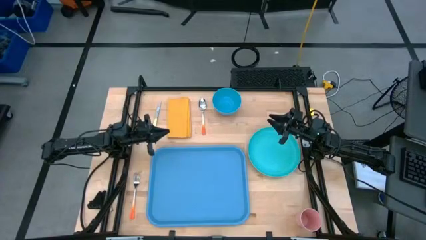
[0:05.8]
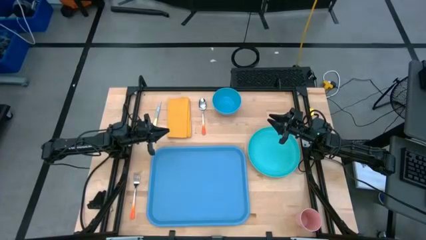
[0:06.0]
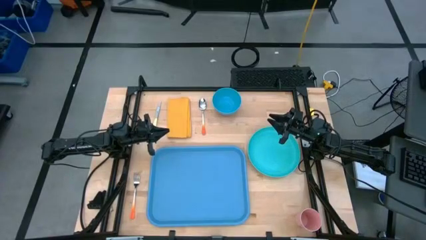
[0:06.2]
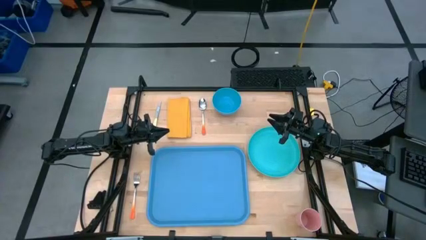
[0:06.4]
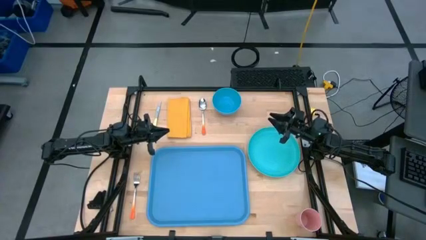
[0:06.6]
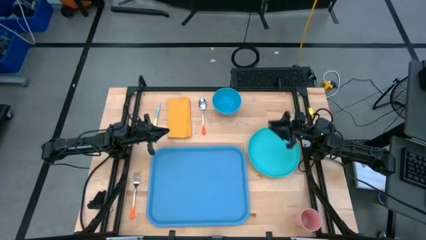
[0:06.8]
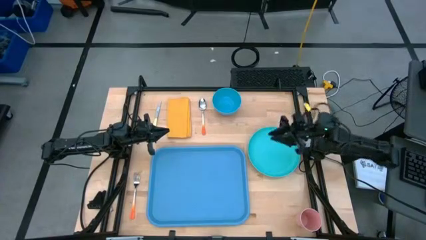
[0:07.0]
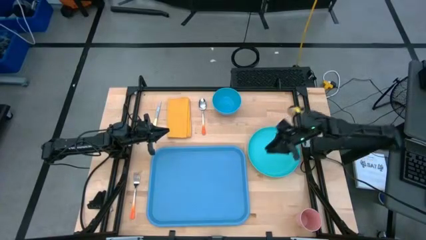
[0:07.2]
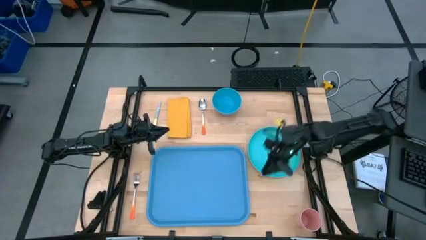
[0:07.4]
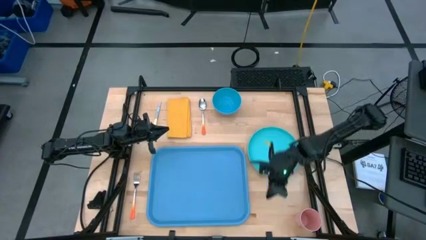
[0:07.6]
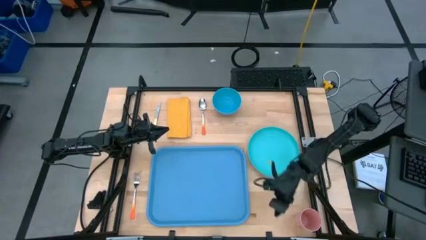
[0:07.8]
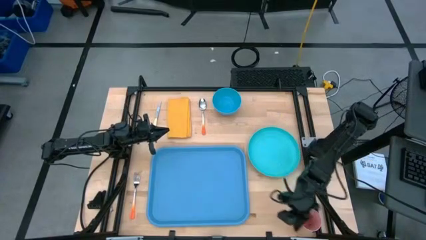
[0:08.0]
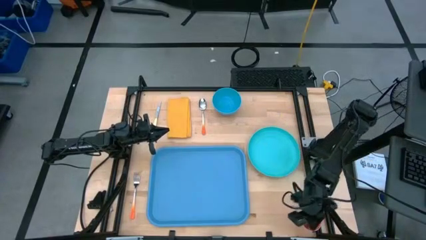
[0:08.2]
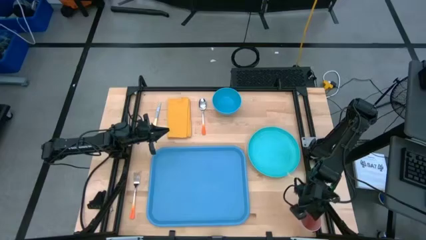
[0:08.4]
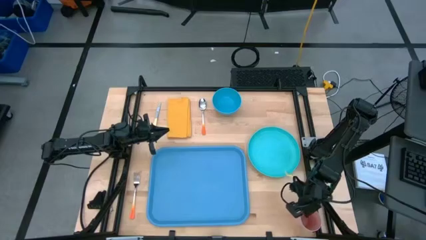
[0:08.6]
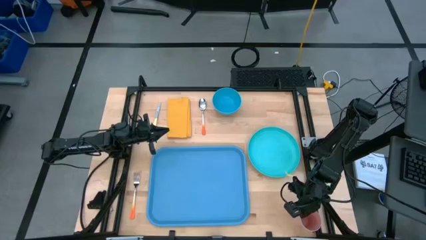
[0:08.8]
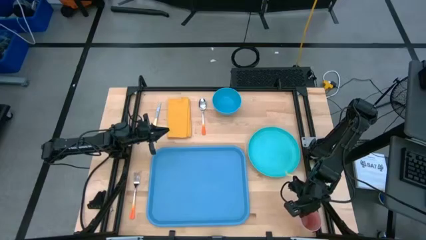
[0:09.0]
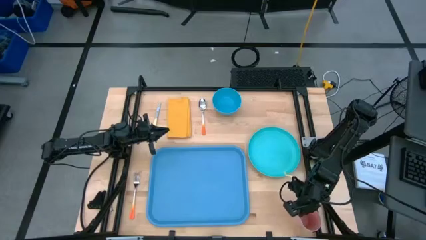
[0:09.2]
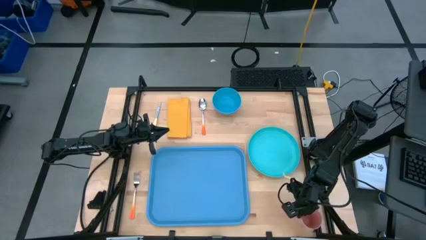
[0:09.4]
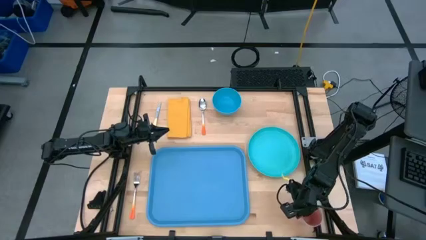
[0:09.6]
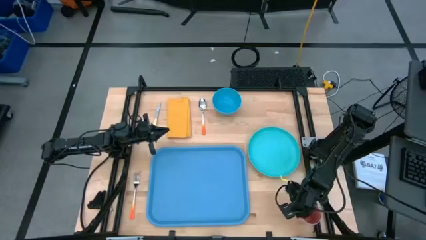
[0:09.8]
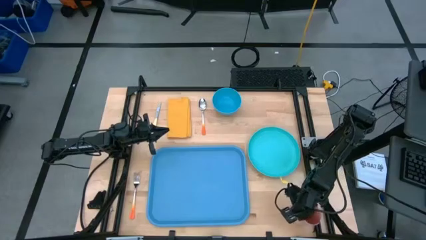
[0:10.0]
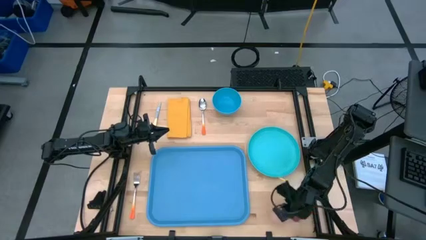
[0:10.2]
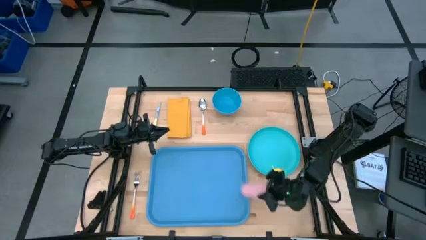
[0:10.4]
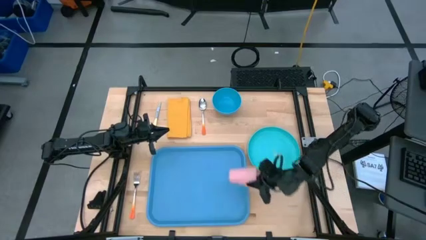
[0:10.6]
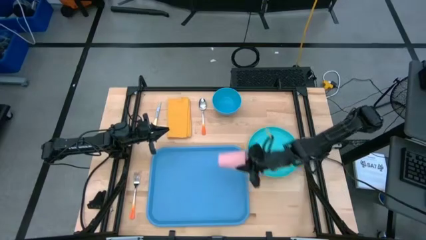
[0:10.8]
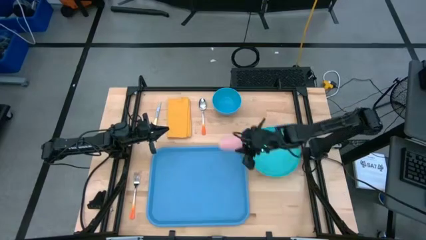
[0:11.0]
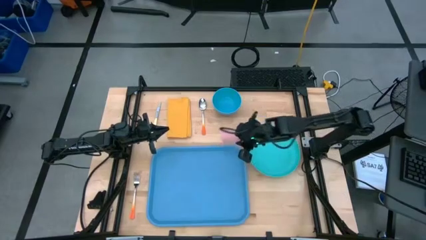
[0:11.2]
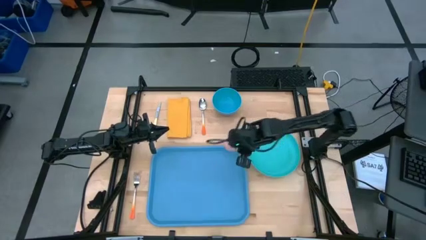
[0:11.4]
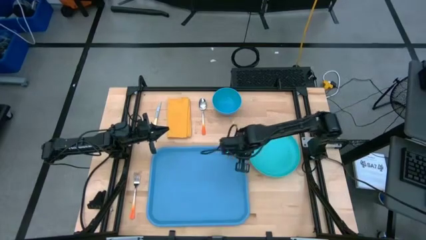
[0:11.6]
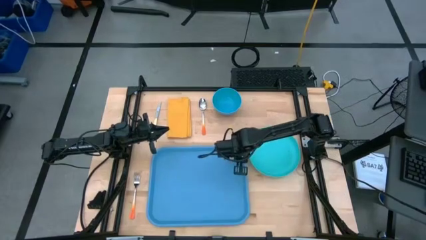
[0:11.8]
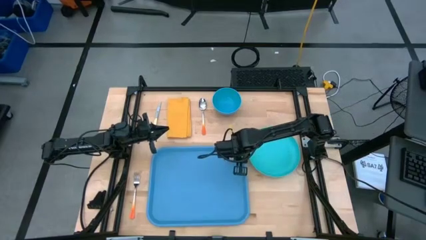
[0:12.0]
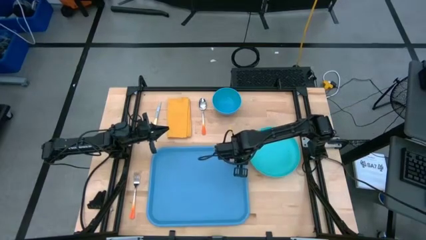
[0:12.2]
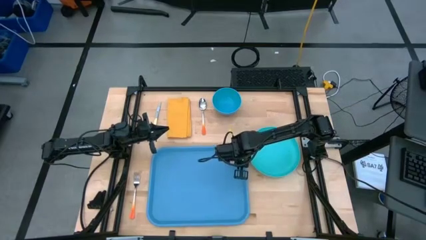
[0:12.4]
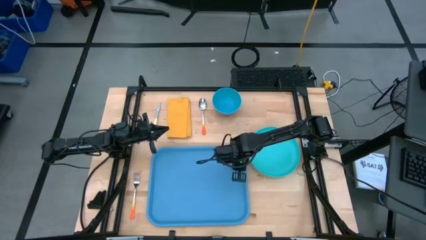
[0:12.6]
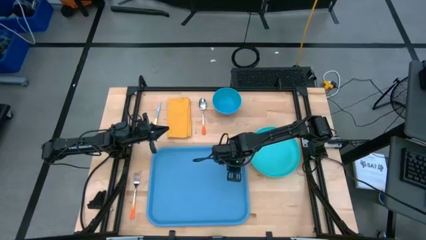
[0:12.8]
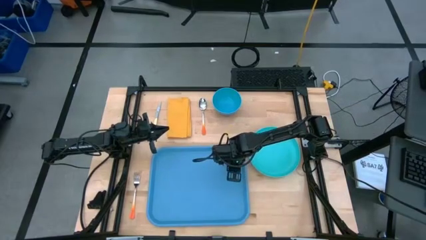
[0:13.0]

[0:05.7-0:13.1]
Task: Set up tray
Put the pink cup at the top right of the blue serving tray

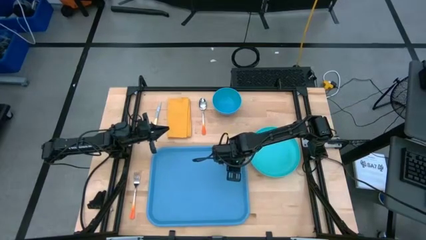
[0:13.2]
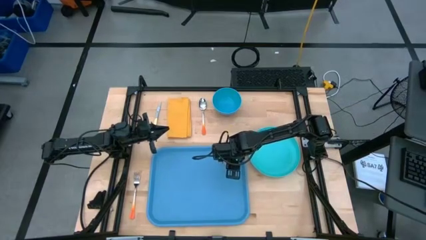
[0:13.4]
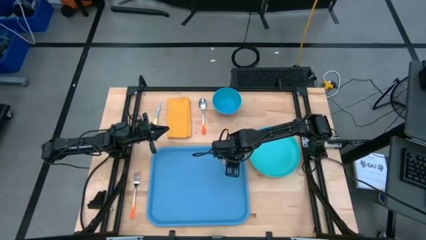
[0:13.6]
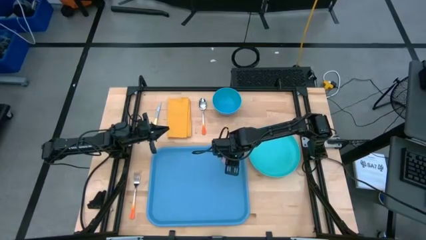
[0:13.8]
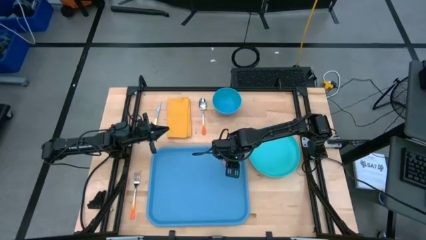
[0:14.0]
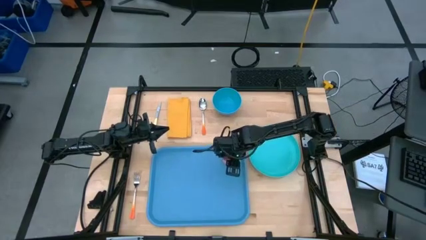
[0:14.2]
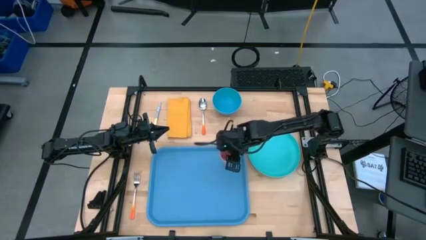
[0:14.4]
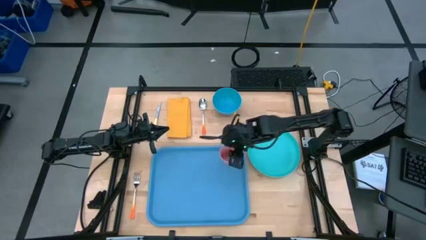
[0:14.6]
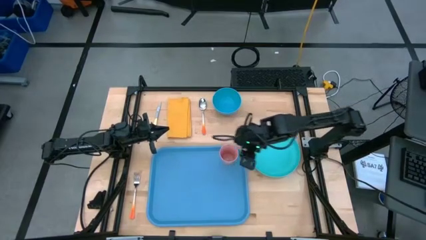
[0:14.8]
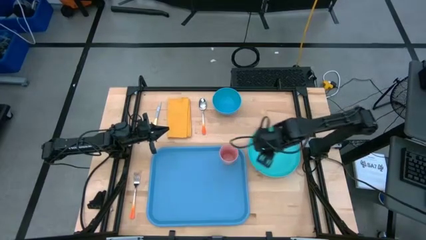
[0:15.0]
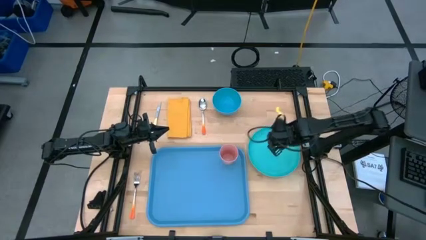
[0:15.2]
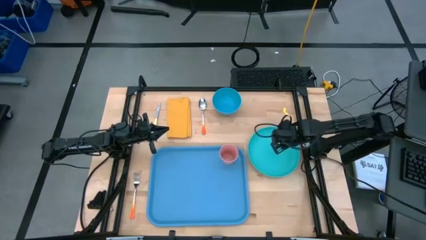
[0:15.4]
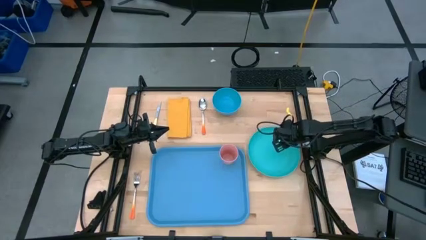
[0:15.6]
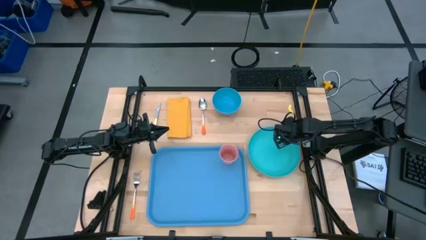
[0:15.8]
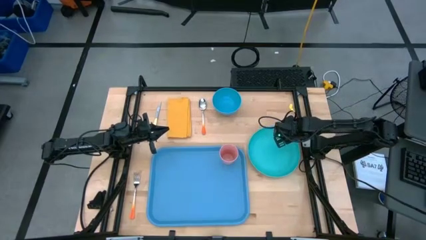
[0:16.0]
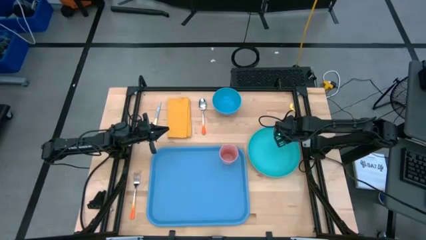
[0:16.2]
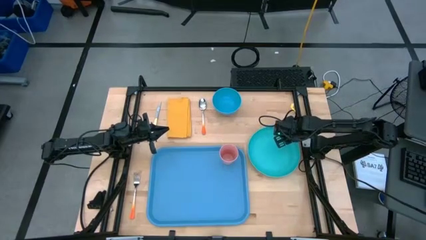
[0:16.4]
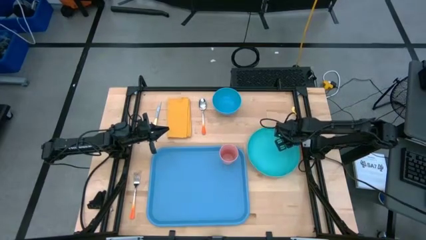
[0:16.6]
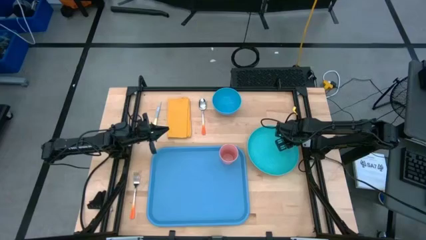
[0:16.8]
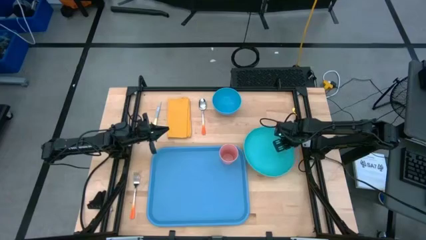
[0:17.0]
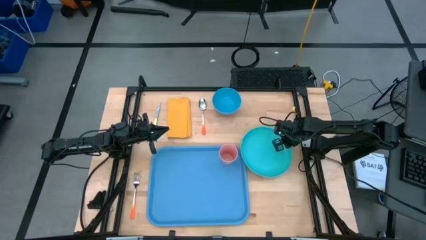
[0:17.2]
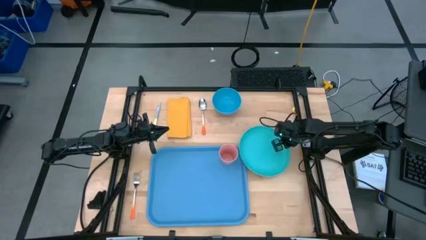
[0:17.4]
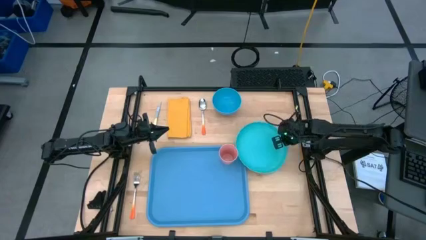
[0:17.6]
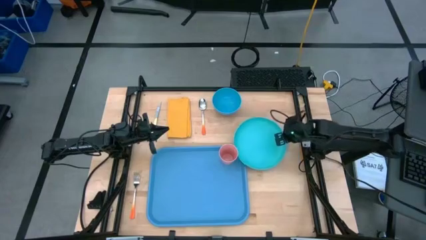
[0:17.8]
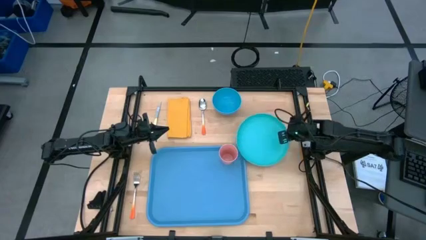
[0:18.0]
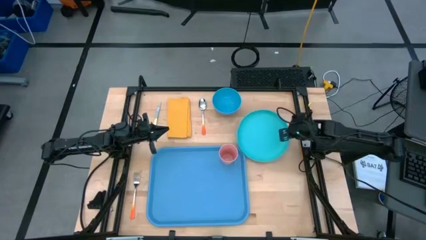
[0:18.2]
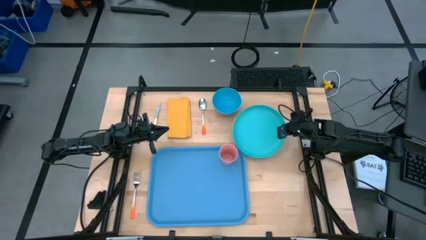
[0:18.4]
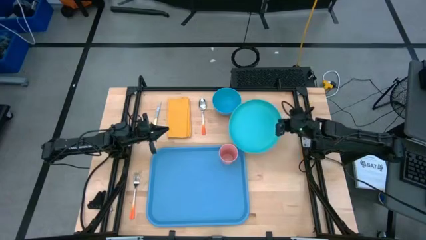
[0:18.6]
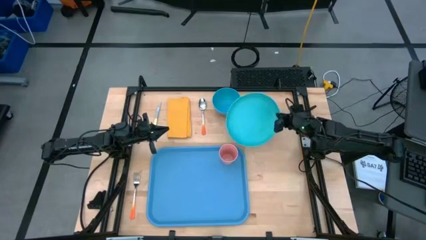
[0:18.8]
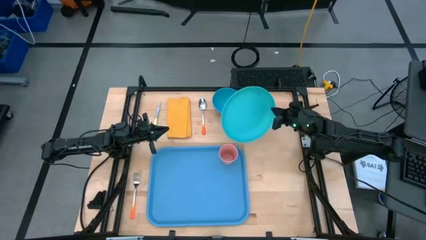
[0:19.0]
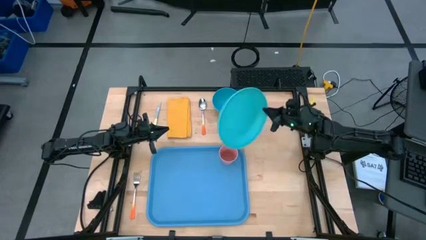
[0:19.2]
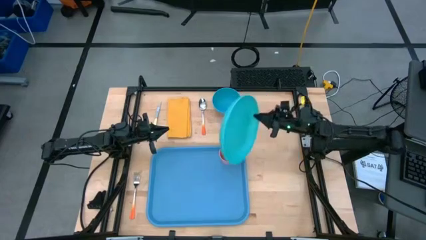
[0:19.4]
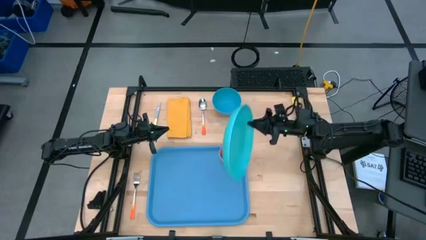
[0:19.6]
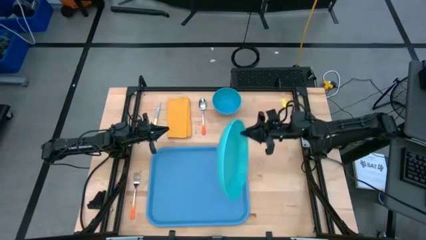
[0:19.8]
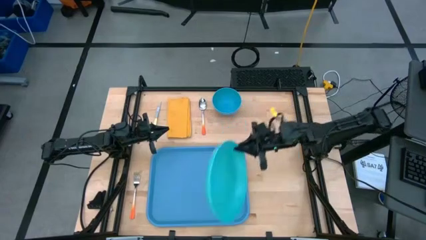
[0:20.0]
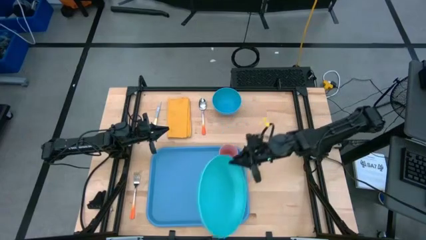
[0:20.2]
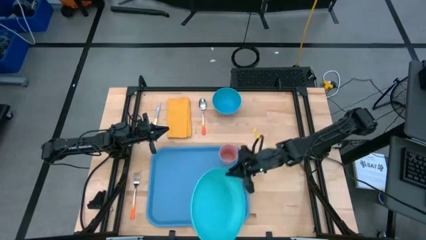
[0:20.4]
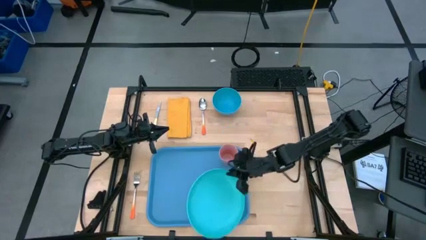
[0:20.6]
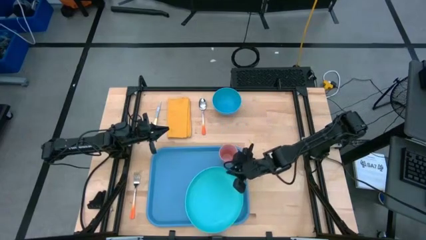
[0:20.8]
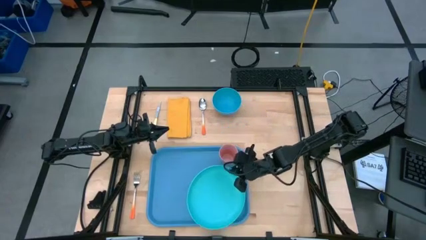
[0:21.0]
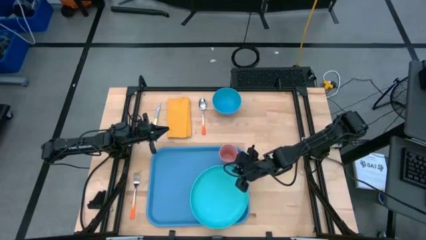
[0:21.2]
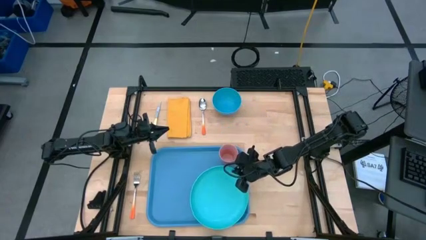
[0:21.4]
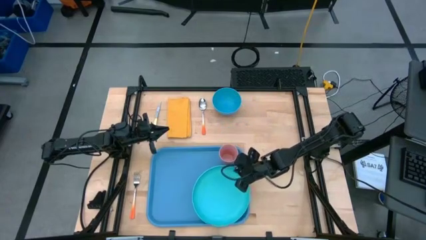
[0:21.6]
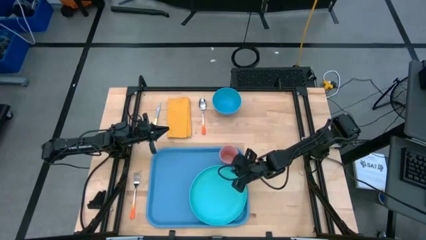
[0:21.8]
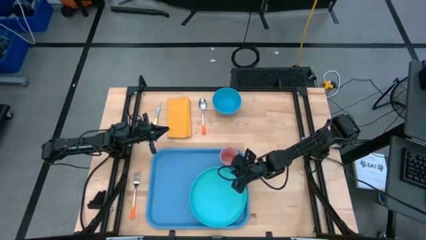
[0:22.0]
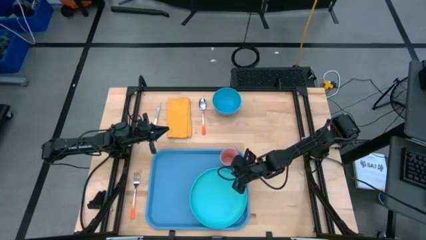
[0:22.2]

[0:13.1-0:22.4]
Put the blue plate at the bottom of the pink cup on the blue serving tray
